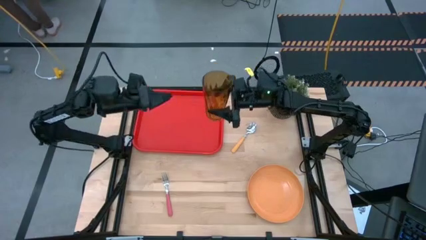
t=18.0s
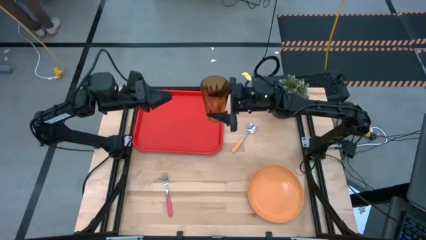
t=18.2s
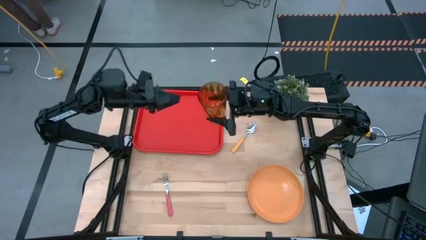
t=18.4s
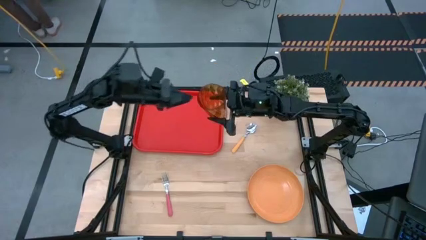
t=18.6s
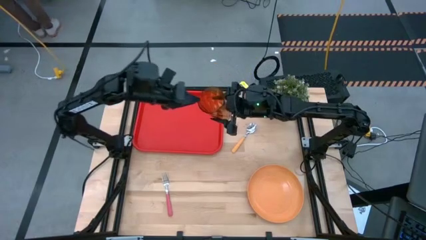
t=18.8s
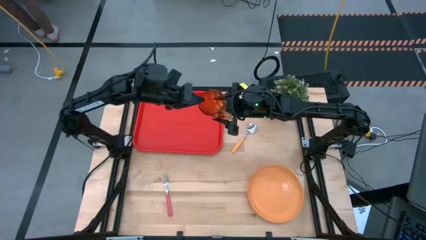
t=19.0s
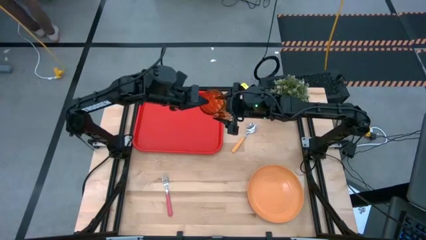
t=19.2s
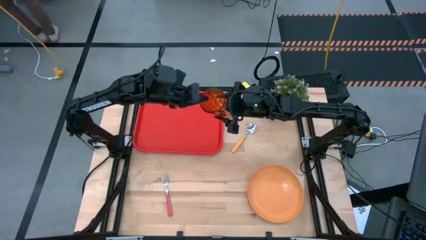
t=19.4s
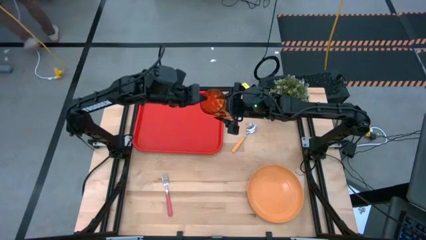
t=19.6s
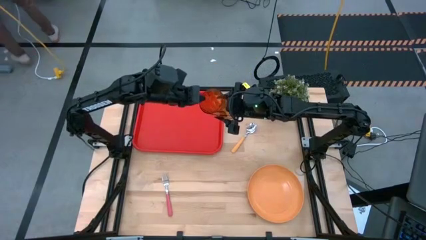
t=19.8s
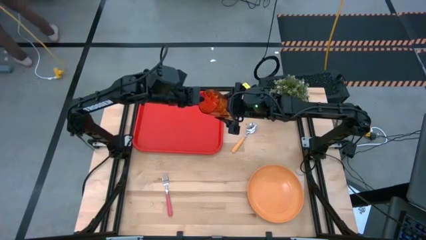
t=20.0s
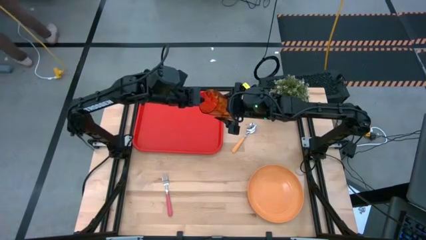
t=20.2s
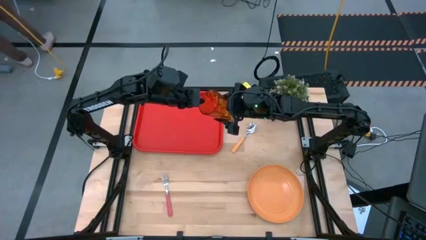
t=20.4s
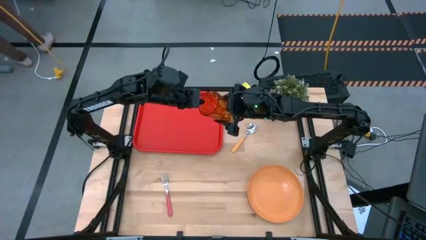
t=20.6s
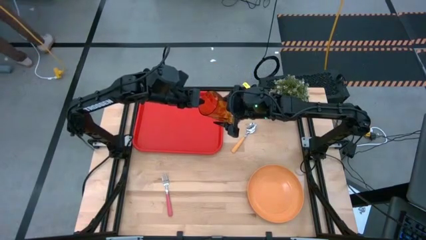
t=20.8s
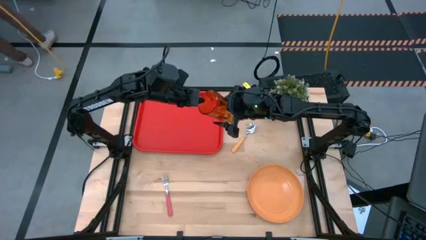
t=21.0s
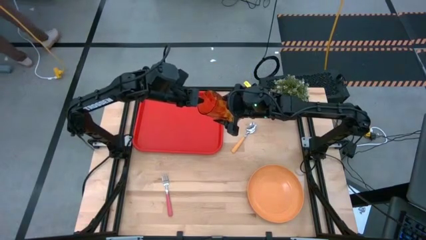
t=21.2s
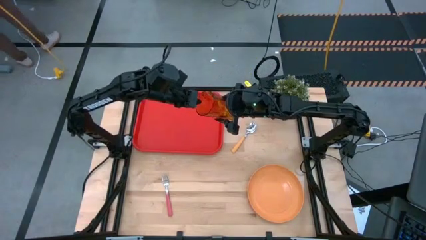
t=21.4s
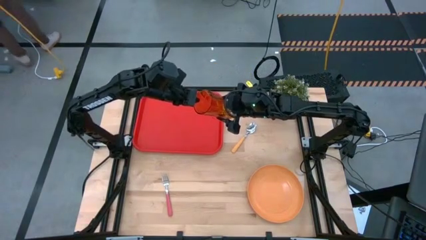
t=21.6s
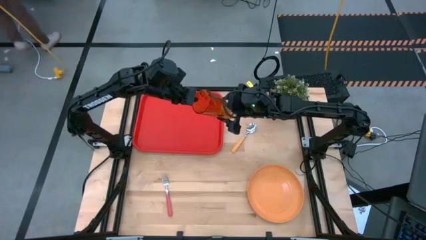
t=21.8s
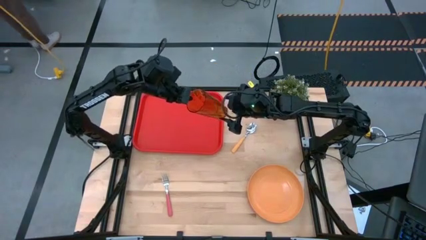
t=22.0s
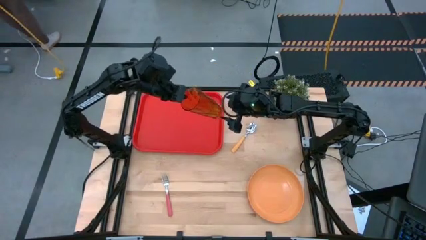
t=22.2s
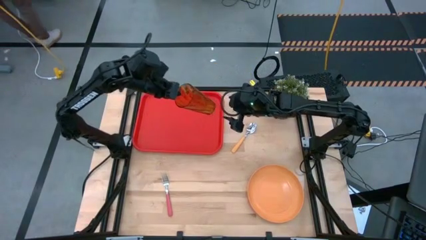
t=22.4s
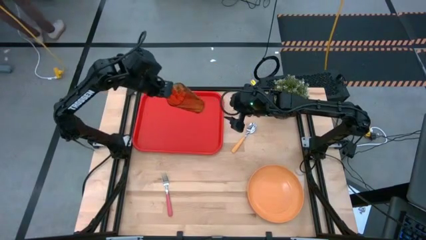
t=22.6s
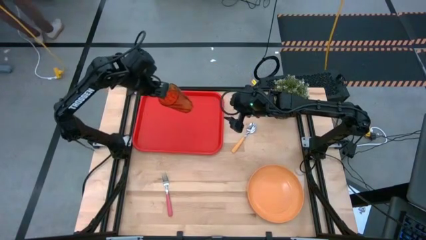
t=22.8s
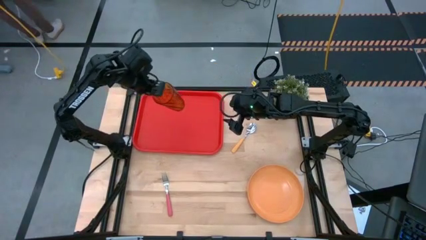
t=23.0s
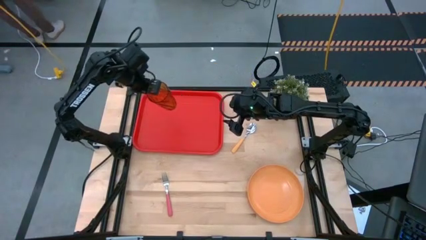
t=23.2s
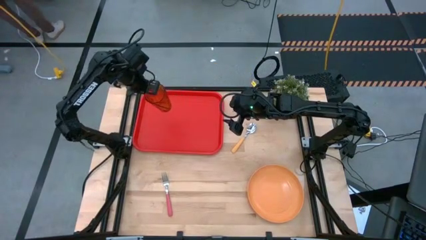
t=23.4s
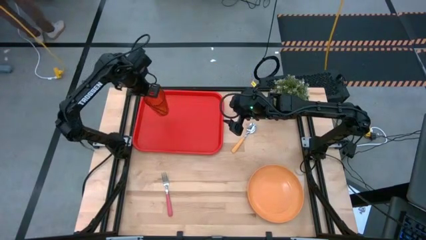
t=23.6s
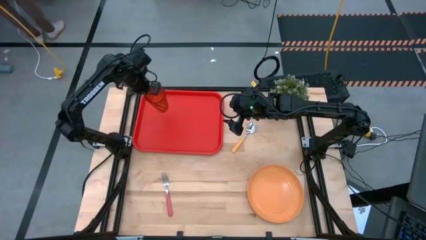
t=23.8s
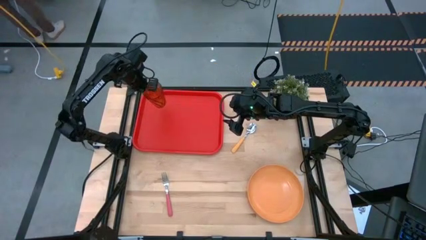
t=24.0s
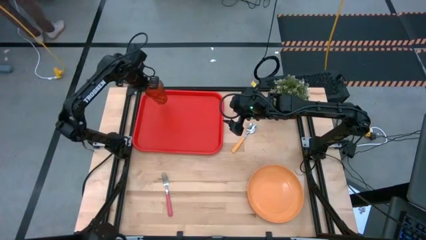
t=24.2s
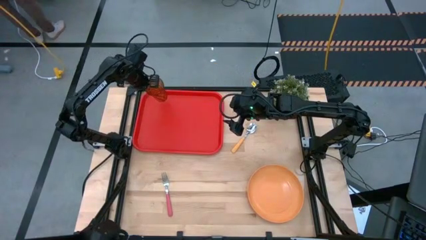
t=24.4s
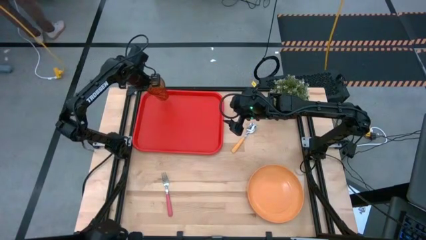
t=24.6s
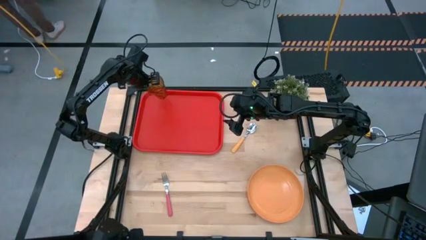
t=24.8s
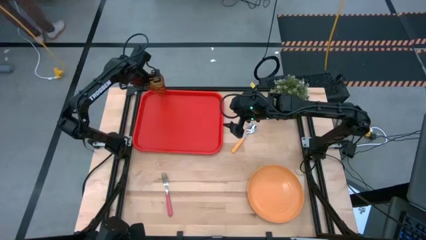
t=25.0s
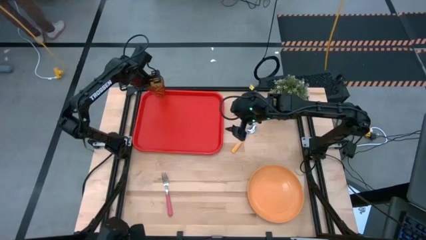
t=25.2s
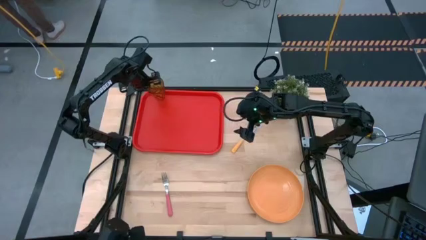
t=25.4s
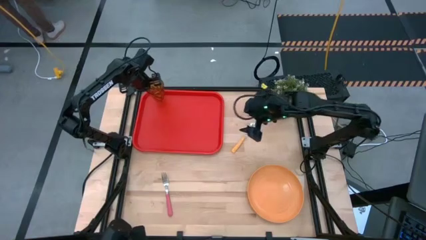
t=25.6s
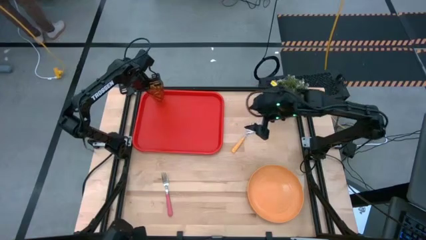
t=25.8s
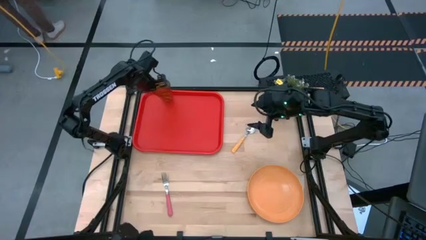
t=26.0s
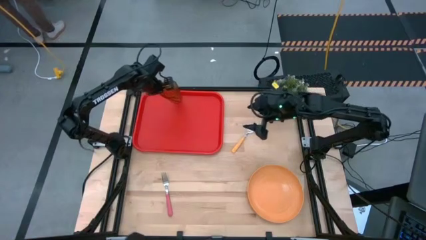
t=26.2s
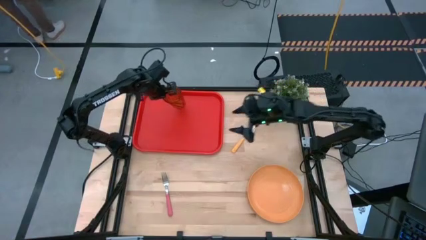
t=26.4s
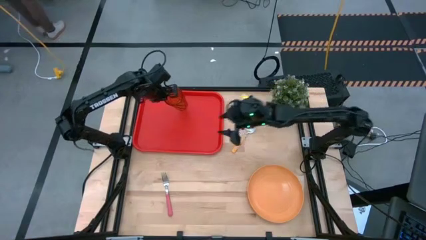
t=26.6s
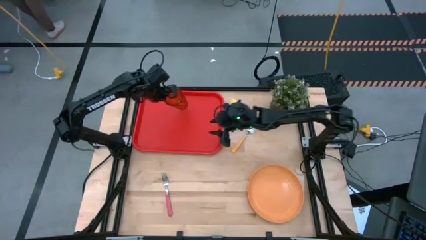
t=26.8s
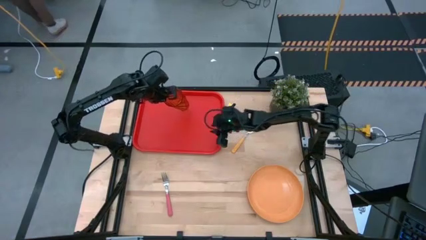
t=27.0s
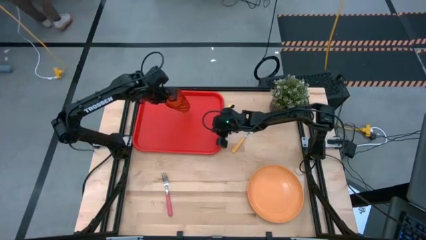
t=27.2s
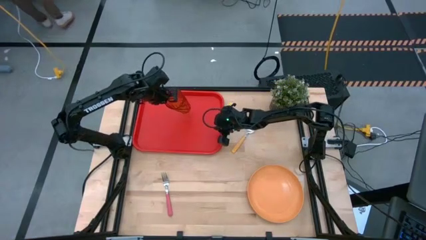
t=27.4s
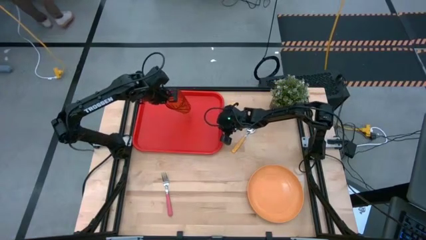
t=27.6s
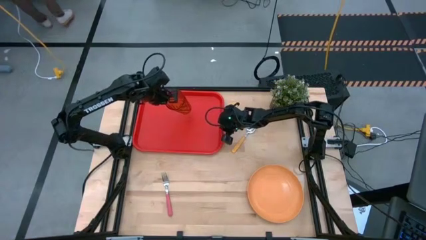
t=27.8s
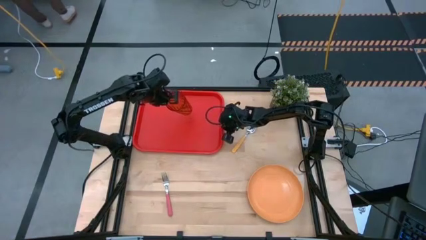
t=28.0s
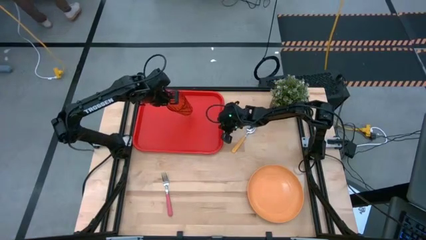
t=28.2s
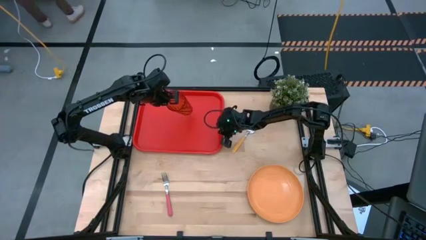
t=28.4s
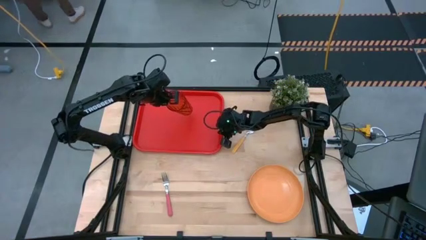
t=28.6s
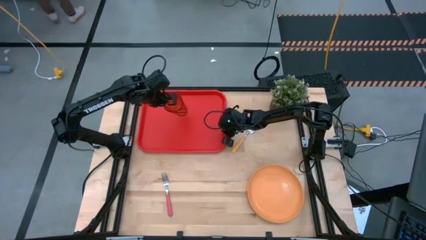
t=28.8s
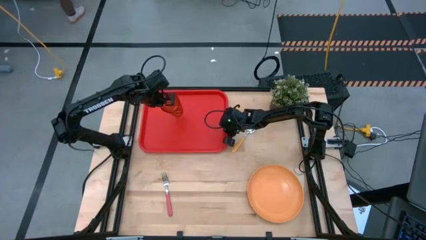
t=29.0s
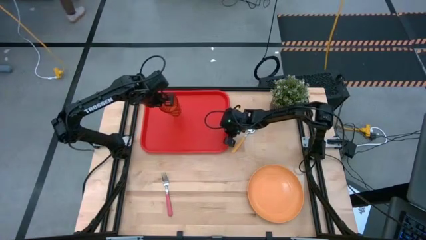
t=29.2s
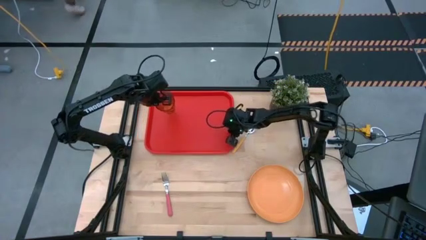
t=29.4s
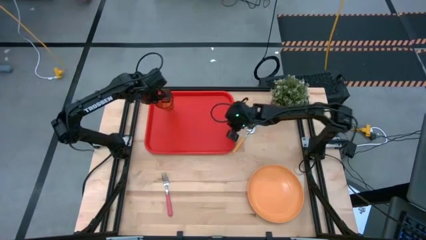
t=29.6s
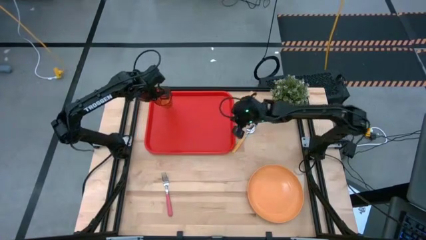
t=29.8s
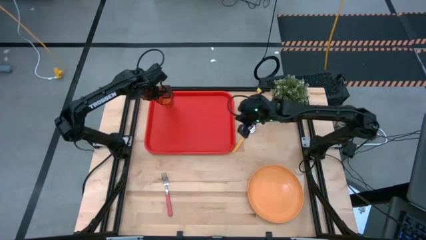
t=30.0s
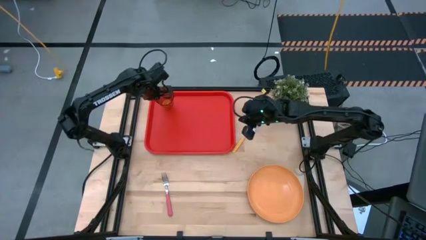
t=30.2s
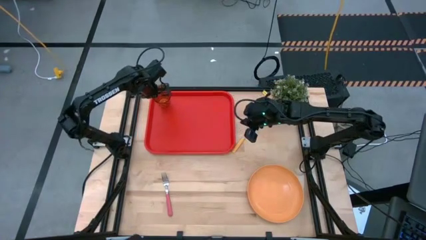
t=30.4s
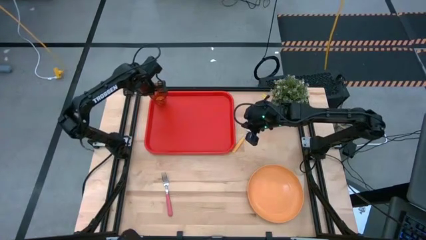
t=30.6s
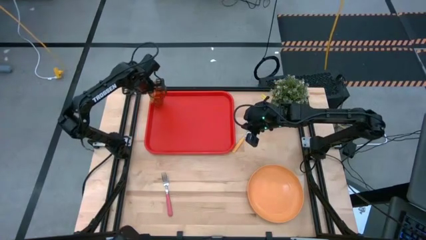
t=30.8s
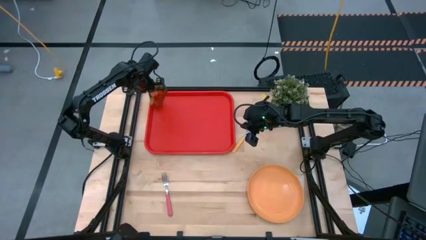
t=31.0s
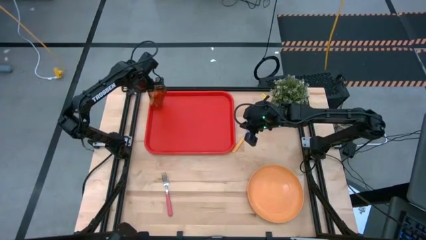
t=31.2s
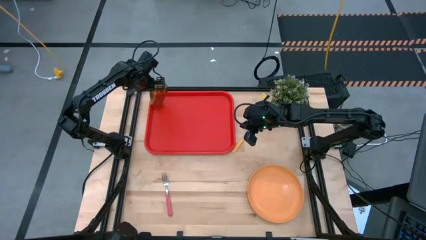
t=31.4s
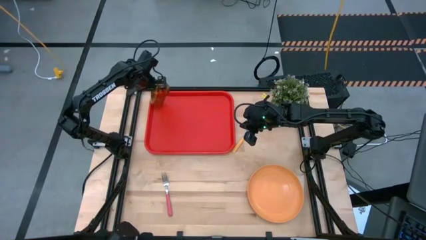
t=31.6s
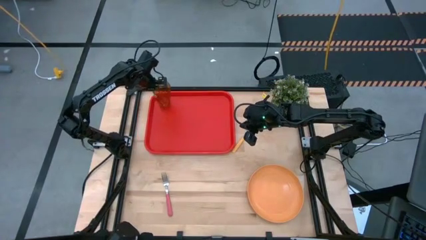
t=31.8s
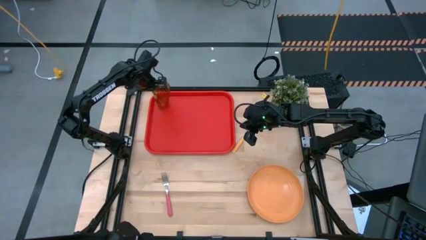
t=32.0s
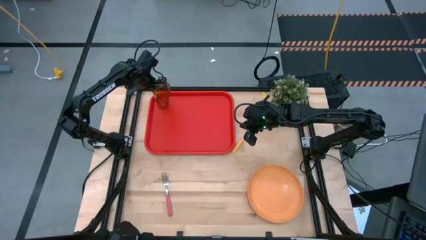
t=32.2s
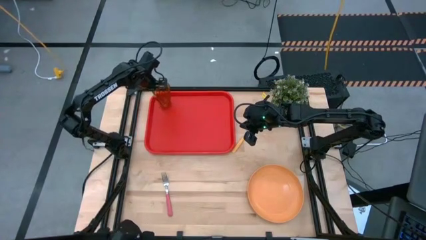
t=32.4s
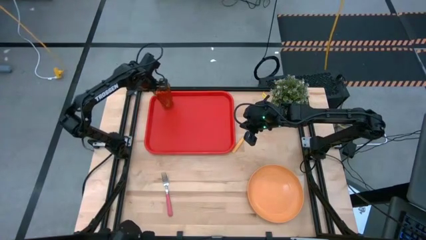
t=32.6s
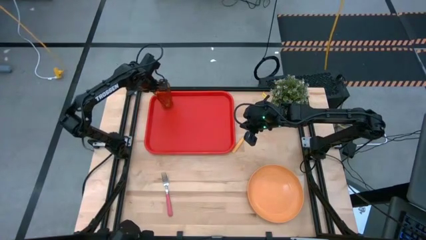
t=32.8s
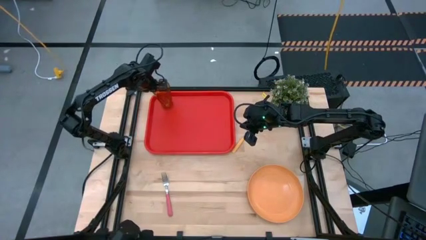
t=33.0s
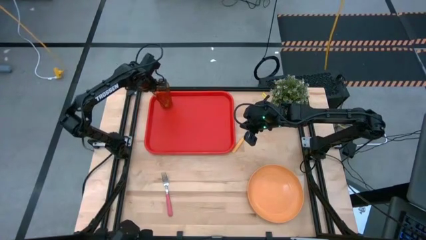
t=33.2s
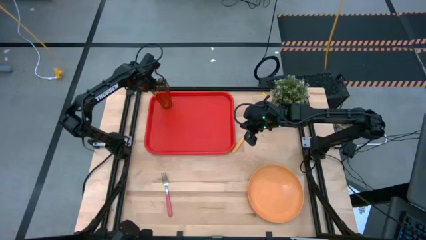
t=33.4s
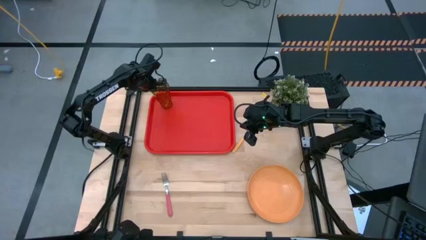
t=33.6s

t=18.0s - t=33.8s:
Task: Pick and place plate/cup/fork/spoon on tray
Put the orange cup on the red tray
